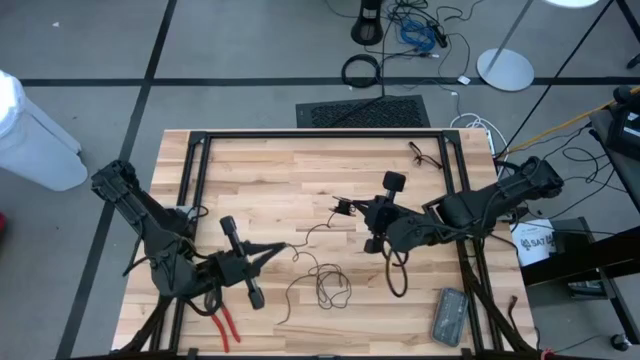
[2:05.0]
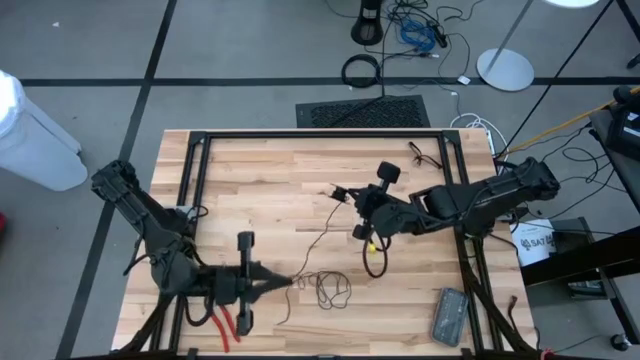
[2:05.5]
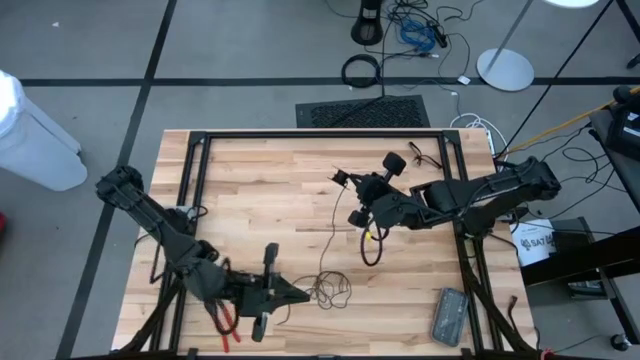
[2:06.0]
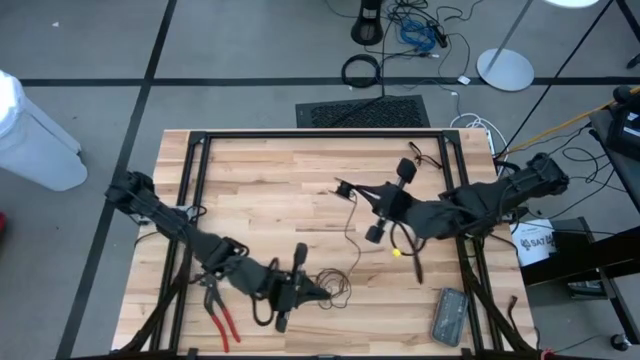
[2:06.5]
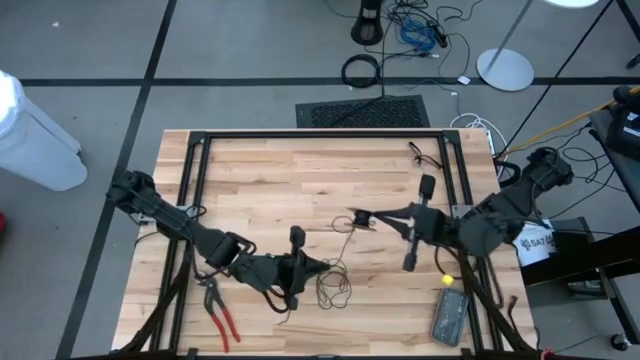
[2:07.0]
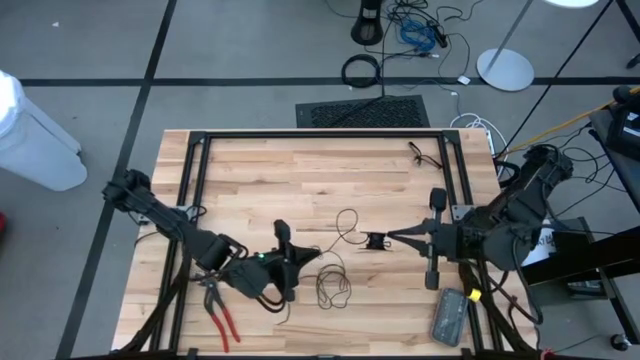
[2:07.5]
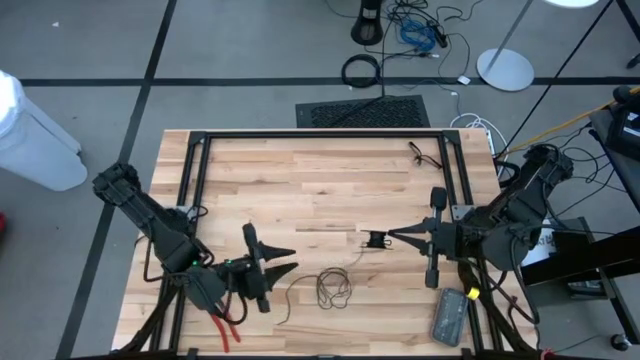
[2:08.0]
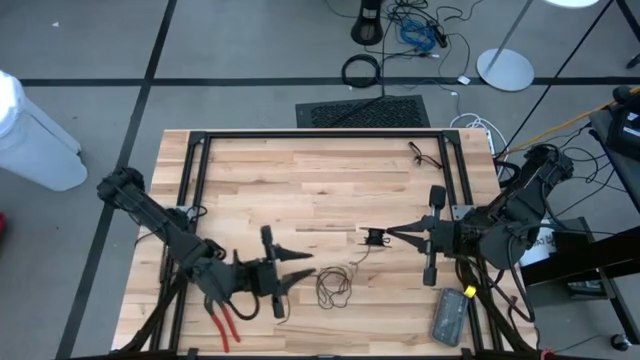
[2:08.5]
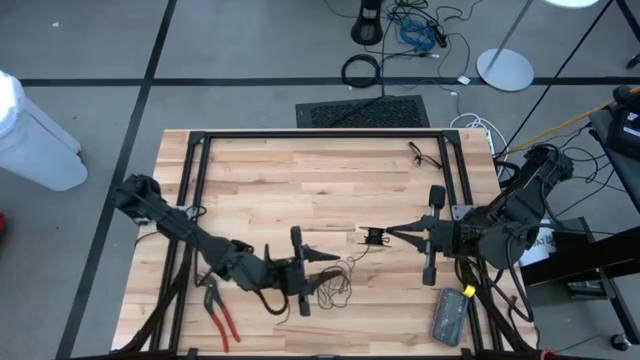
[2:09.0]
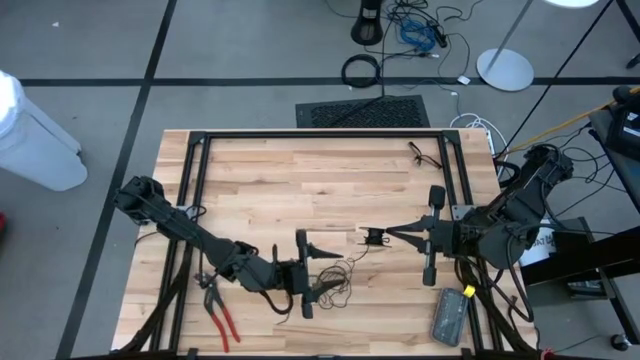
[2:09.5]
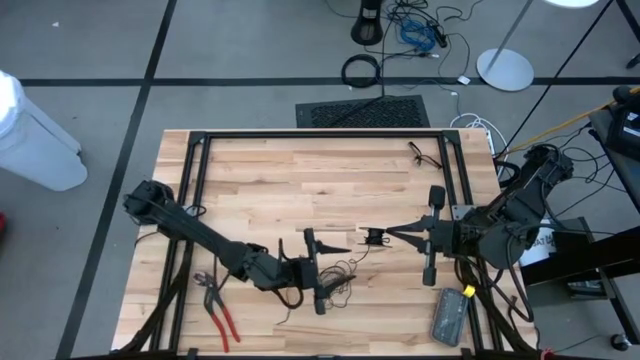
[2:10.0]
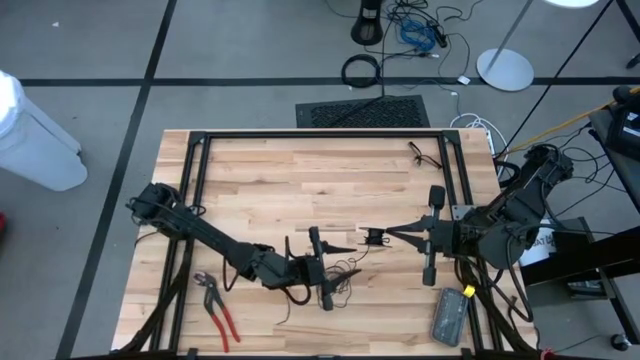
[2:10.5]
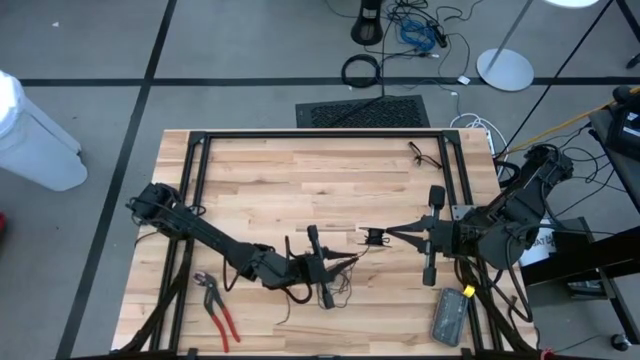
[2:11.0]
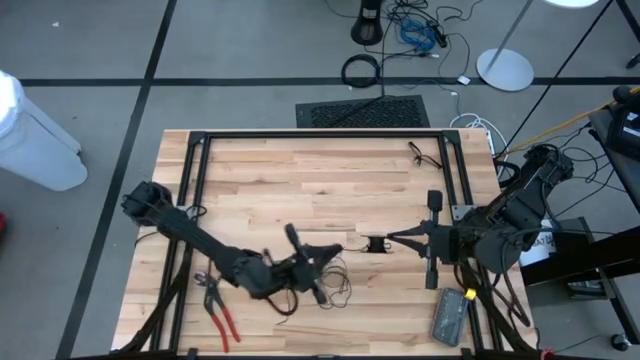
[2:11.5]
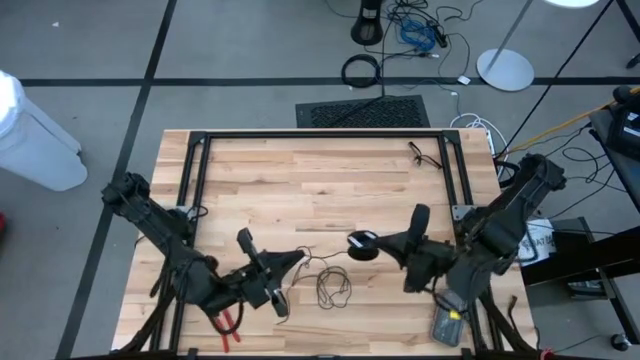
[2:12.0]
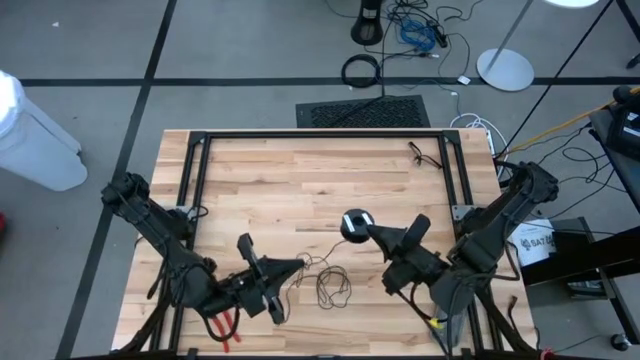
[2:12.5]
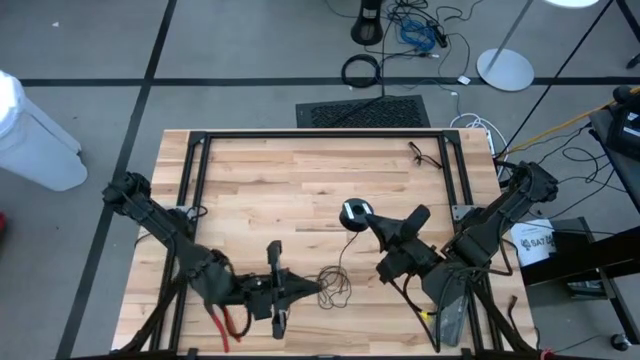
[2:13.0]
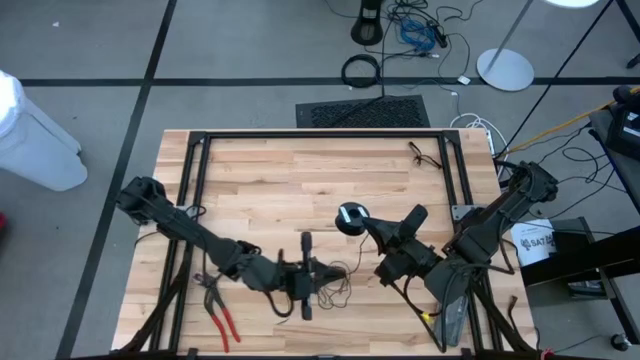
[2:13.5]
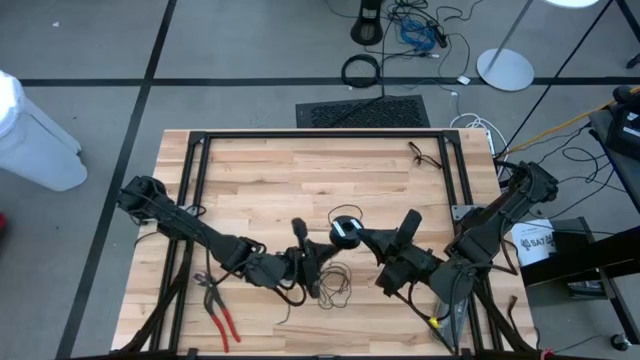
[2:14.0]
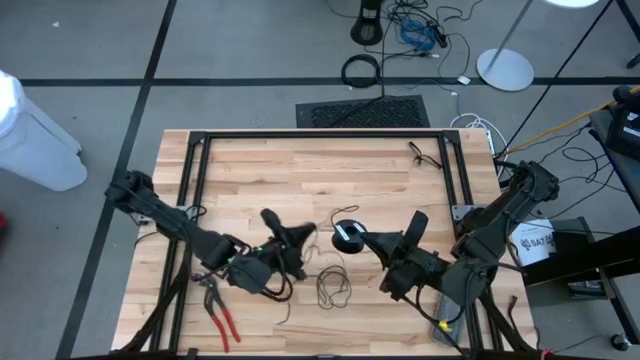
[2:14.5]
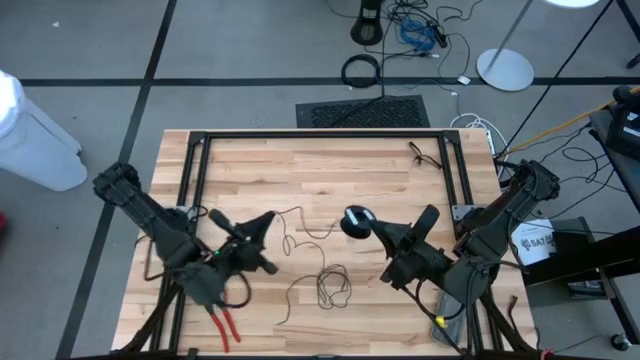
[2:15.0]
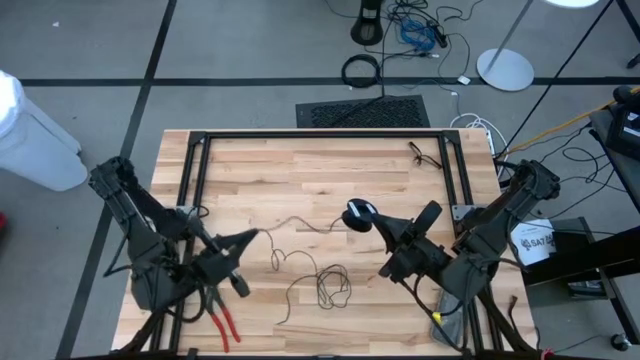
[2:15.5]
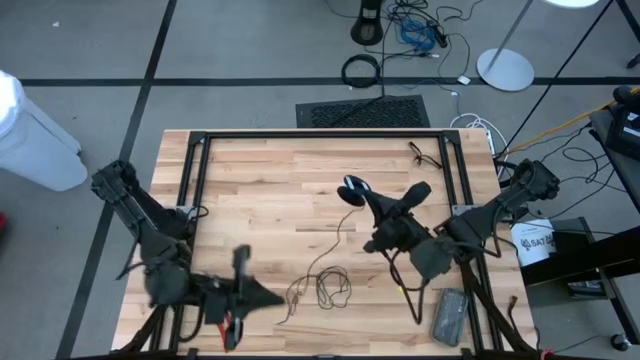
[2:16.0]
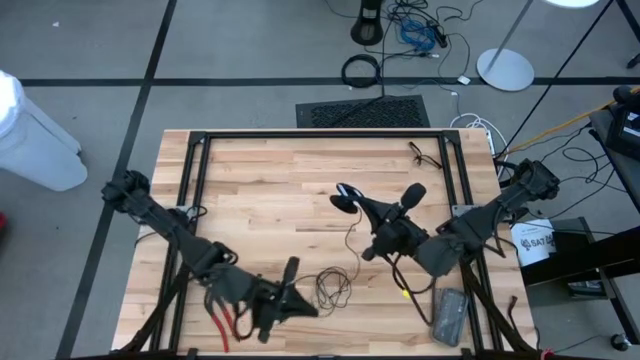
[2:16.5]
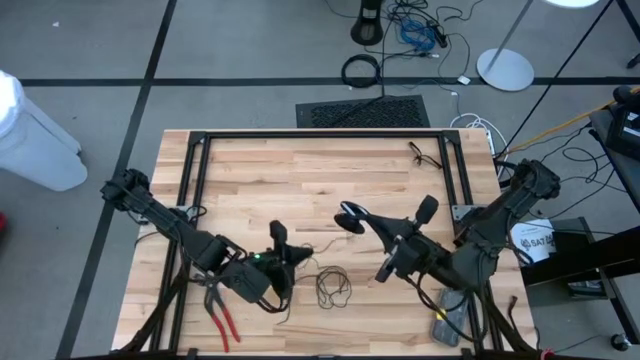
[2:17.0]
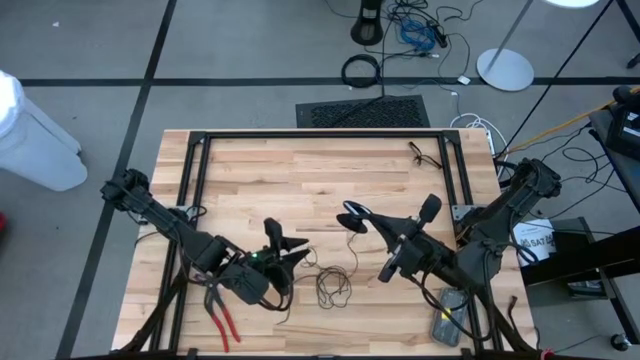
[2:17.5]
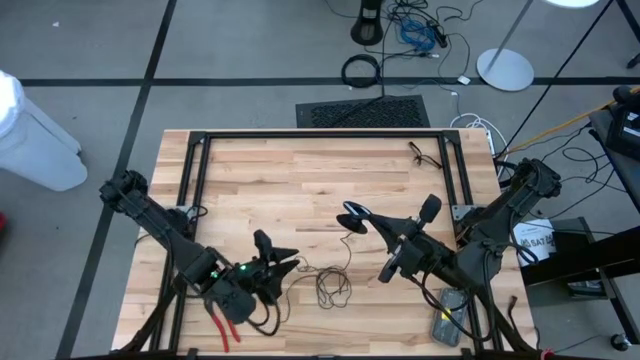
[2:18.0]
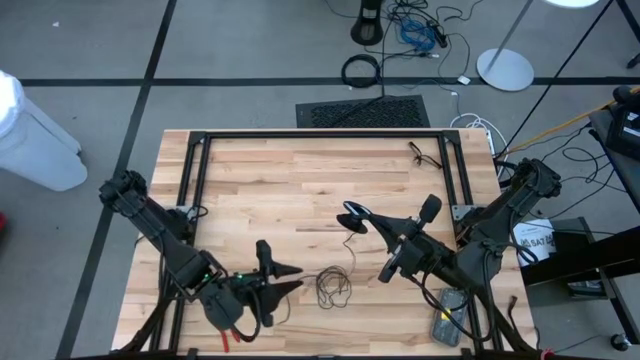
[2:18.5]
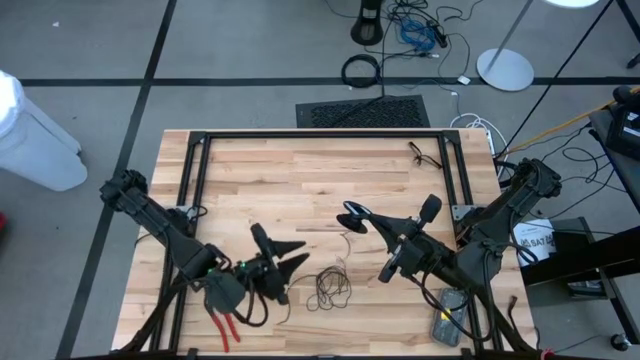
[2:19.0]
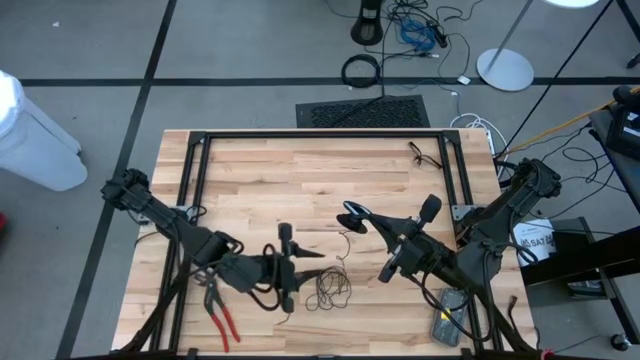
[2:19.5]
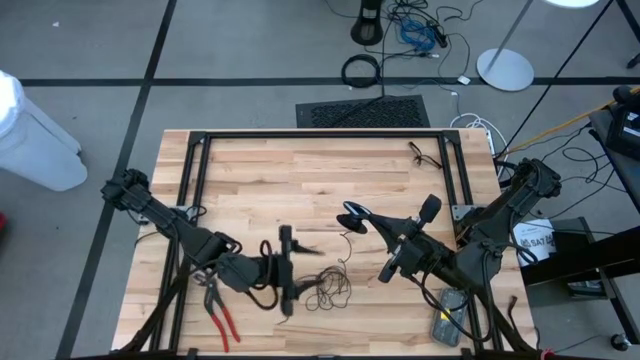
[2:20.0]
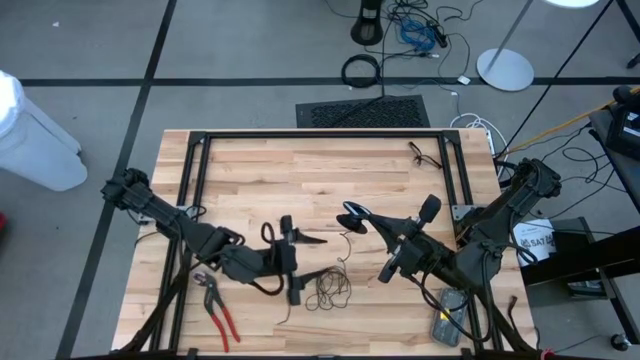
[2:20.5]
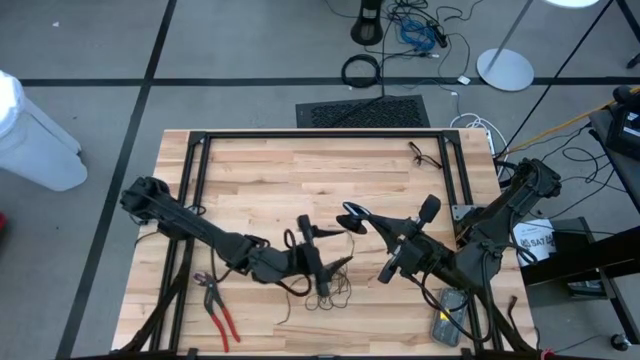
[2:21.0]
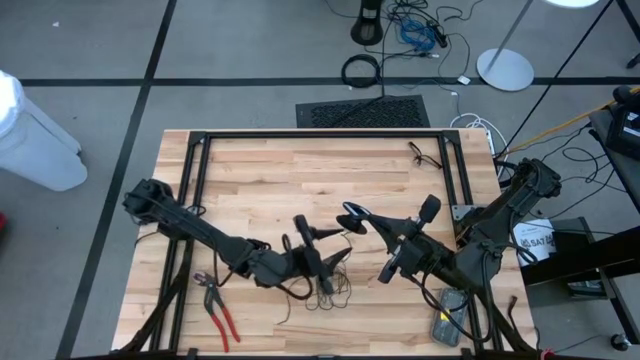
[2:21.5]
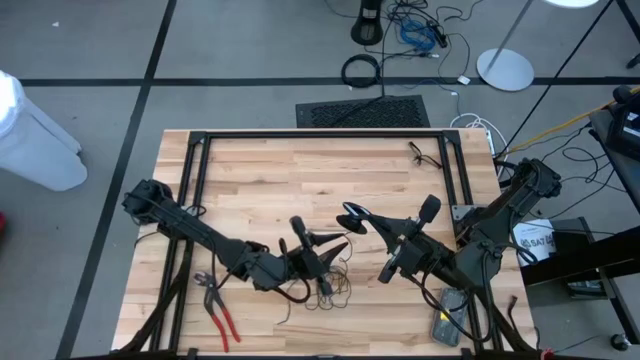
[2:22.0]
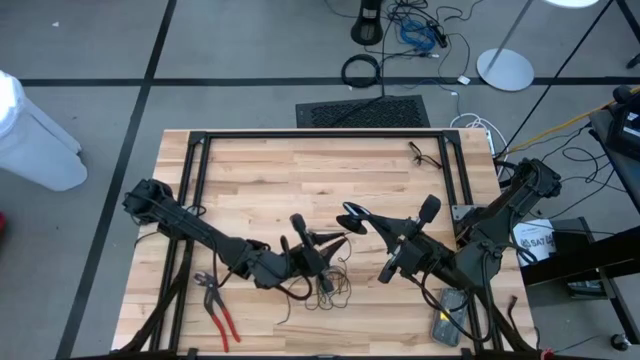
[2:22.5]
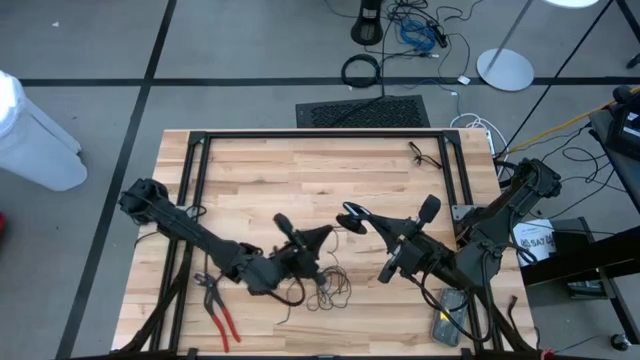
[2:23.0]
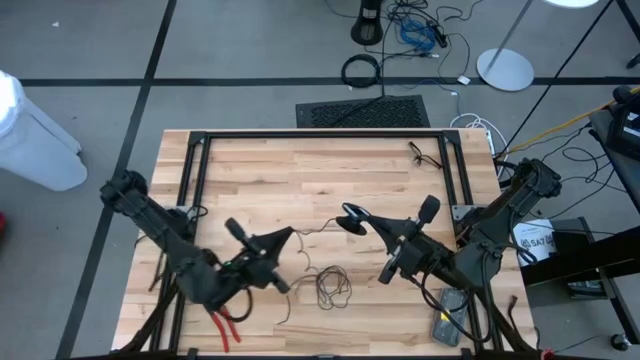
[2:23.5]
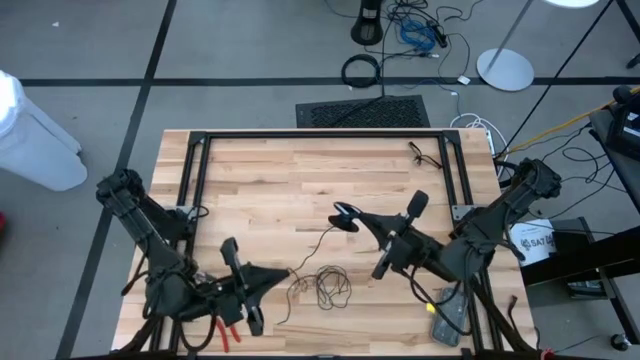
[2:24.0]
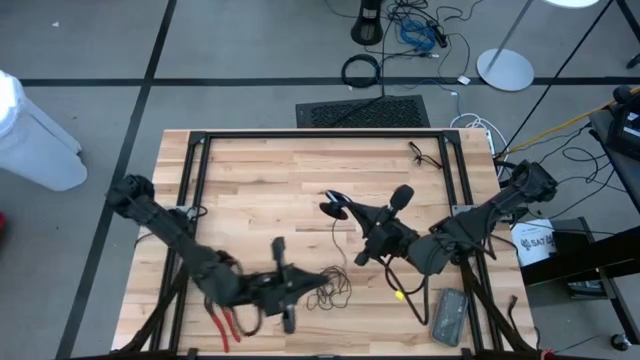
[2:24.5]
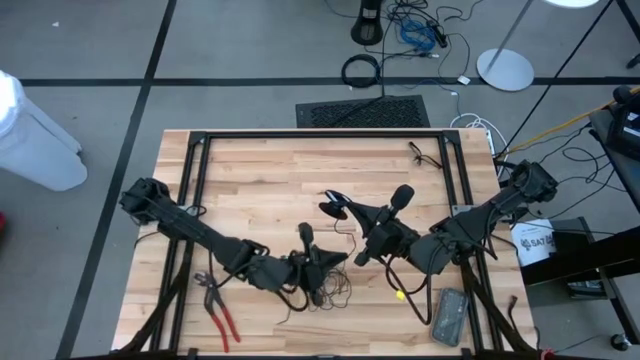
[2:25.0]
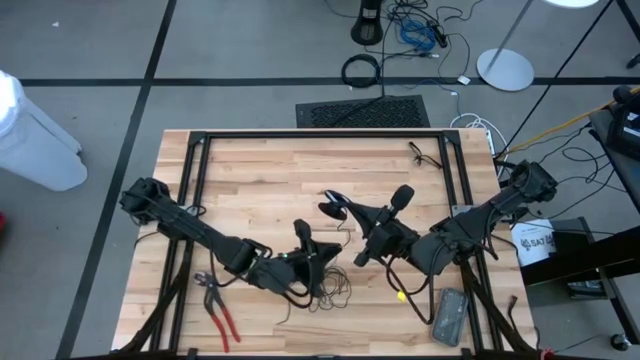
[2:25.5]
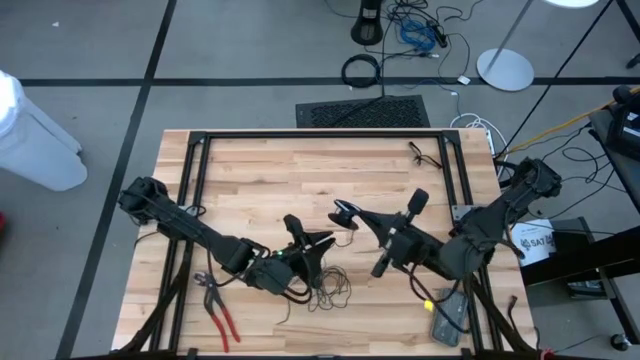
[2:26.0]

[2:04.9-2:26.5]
Task: Coil cords
Uncoil the black wire from the black spool
